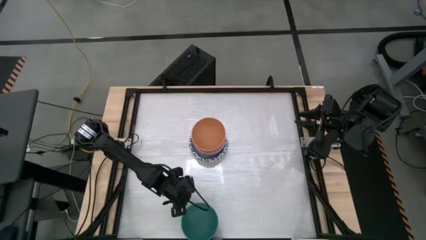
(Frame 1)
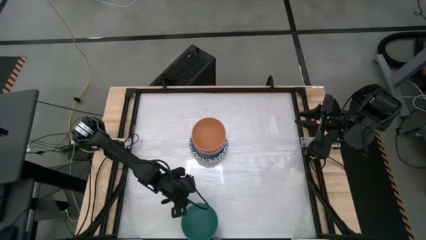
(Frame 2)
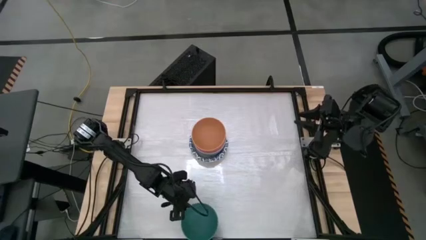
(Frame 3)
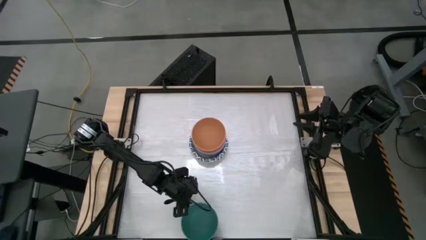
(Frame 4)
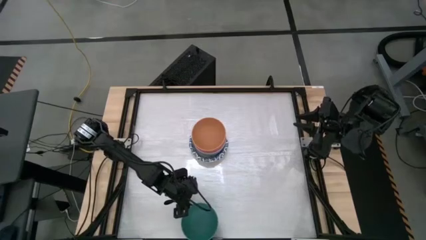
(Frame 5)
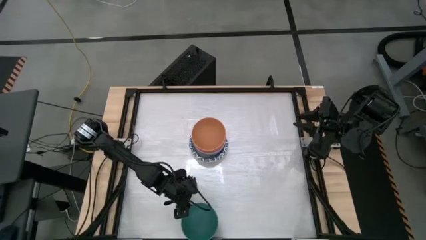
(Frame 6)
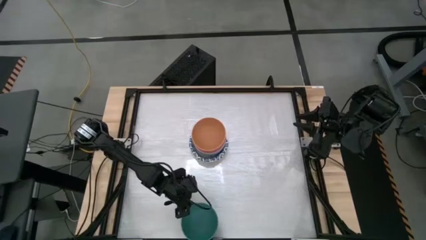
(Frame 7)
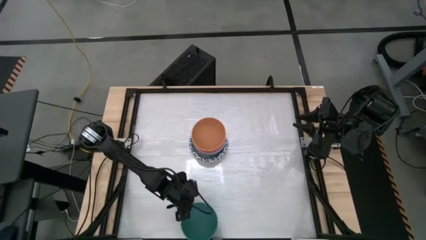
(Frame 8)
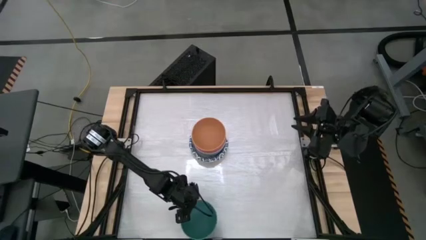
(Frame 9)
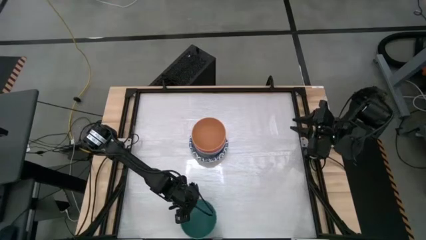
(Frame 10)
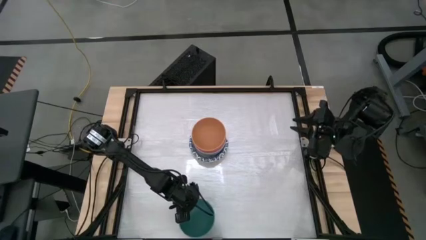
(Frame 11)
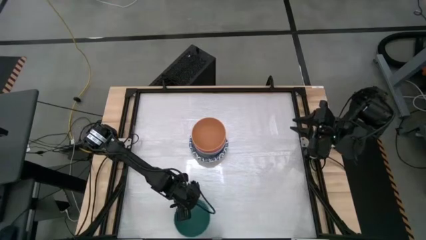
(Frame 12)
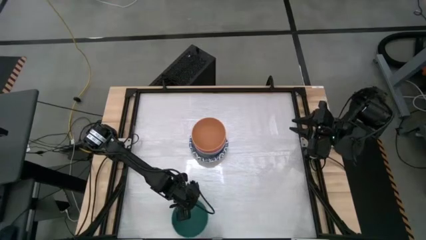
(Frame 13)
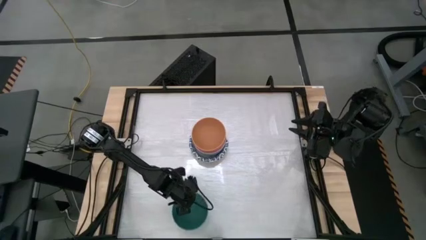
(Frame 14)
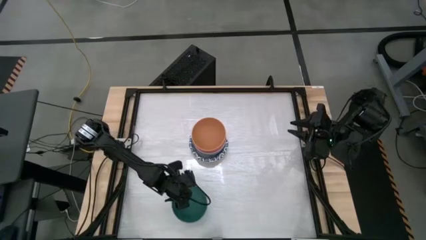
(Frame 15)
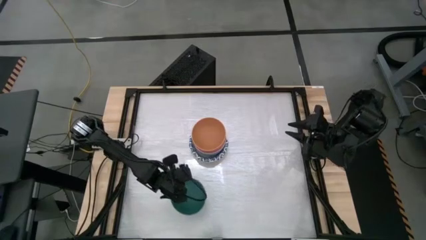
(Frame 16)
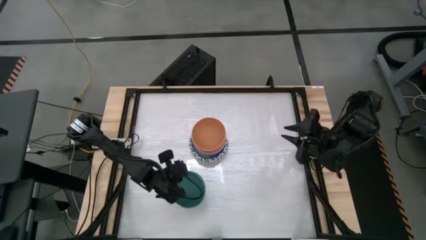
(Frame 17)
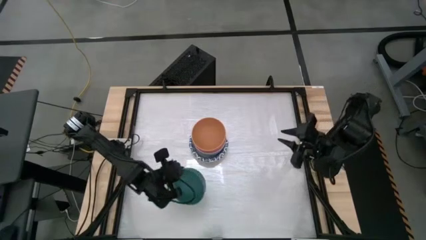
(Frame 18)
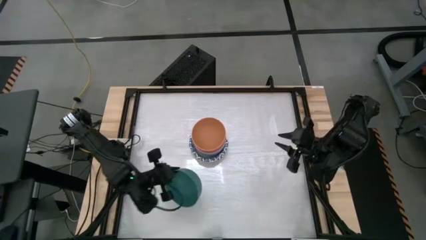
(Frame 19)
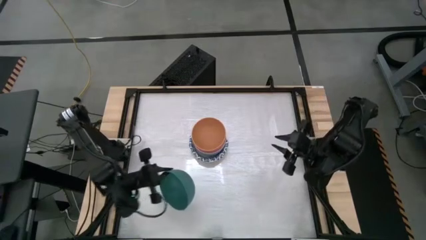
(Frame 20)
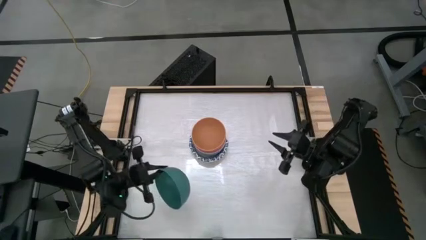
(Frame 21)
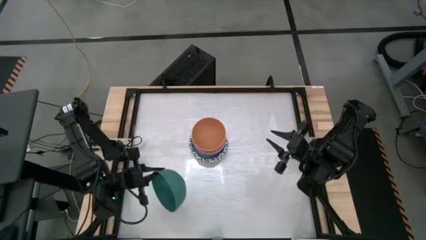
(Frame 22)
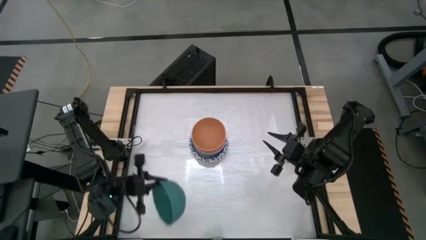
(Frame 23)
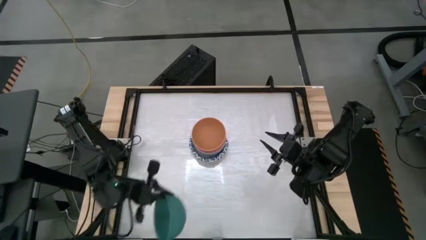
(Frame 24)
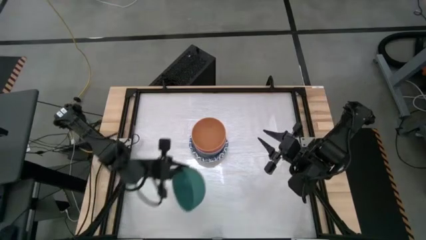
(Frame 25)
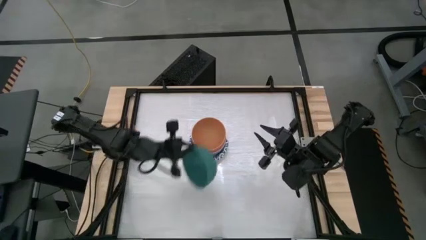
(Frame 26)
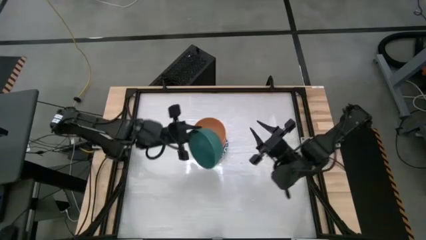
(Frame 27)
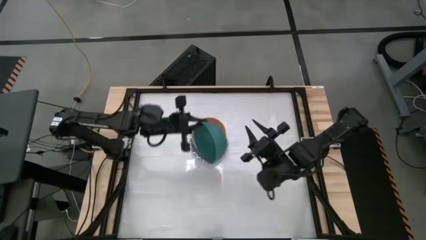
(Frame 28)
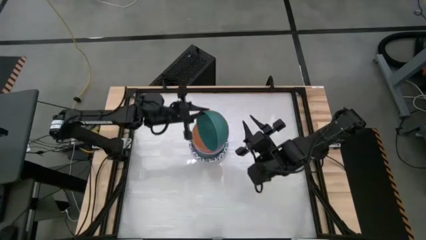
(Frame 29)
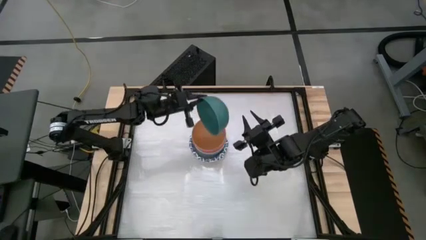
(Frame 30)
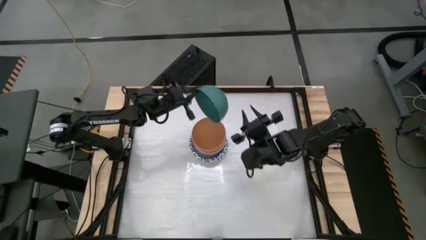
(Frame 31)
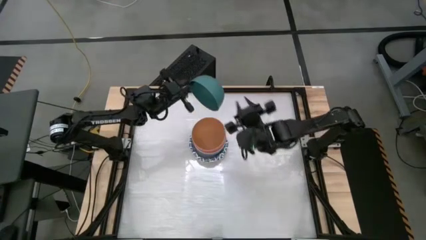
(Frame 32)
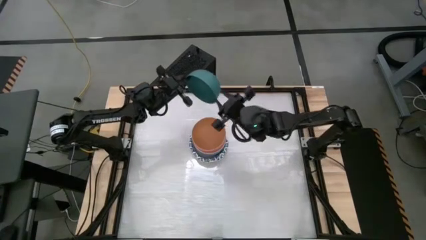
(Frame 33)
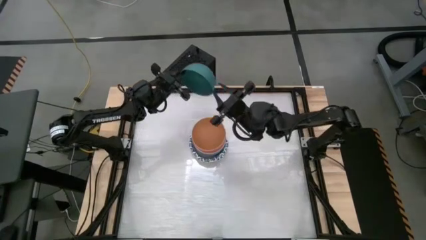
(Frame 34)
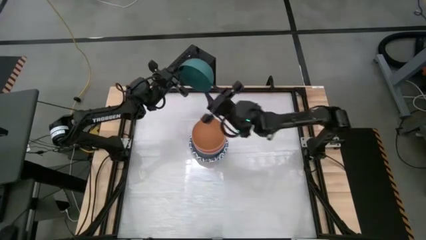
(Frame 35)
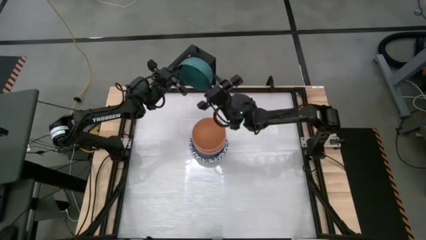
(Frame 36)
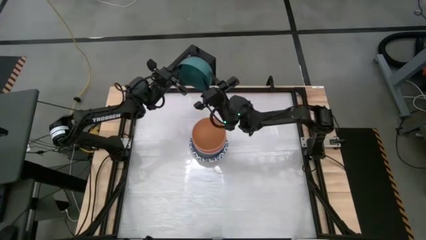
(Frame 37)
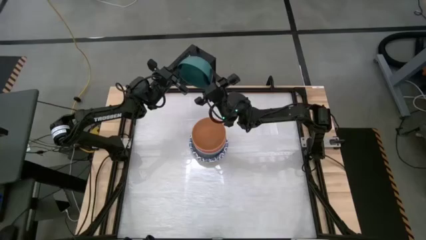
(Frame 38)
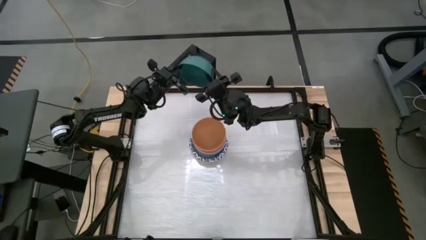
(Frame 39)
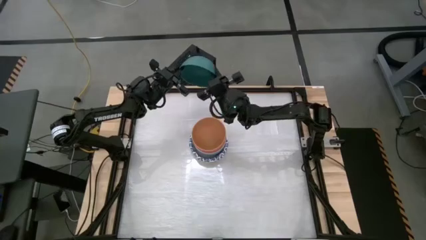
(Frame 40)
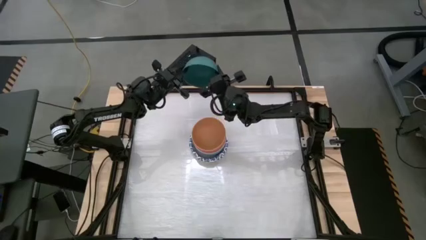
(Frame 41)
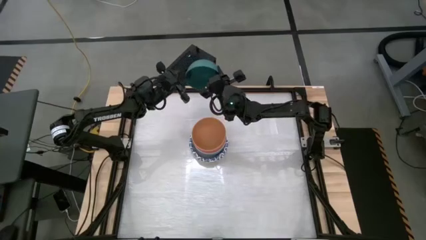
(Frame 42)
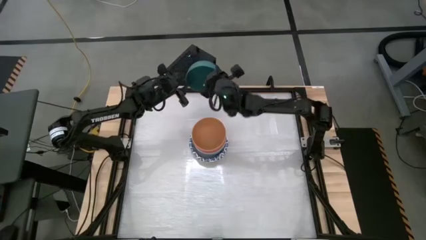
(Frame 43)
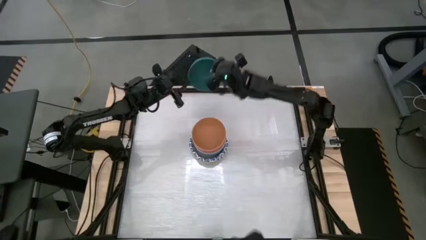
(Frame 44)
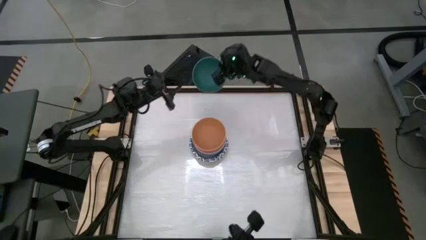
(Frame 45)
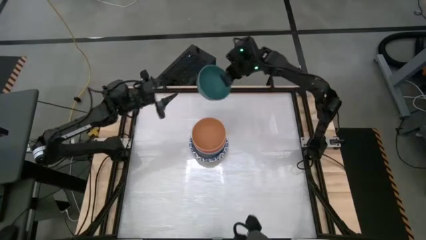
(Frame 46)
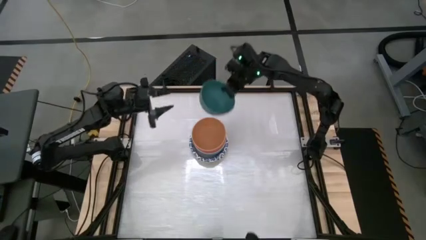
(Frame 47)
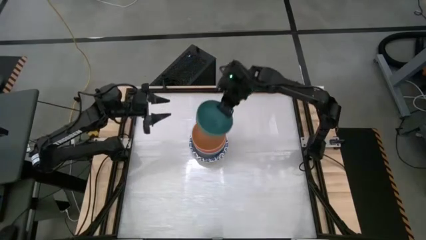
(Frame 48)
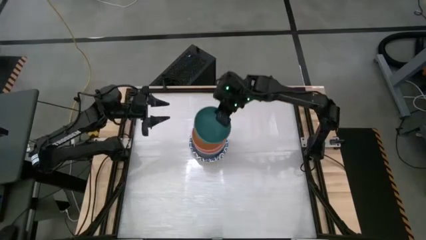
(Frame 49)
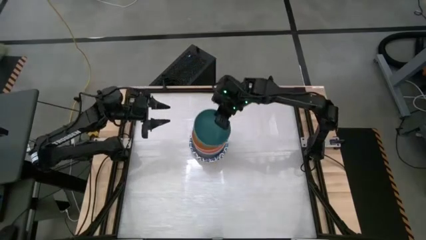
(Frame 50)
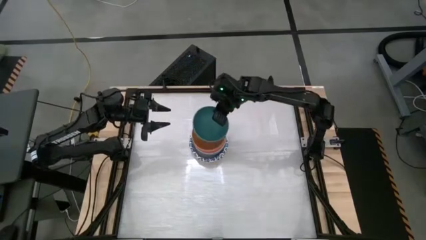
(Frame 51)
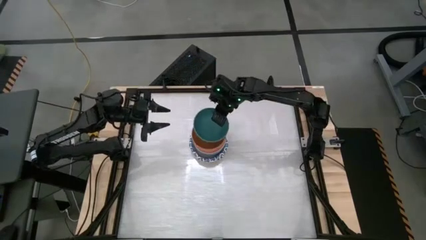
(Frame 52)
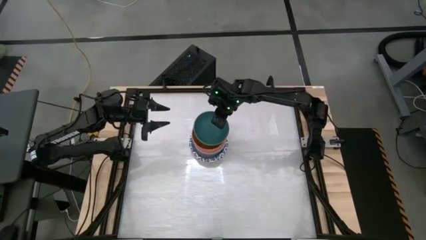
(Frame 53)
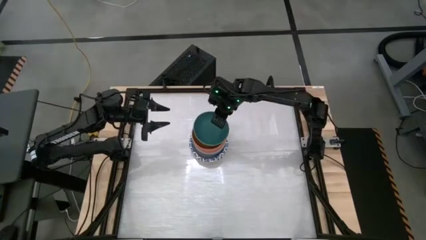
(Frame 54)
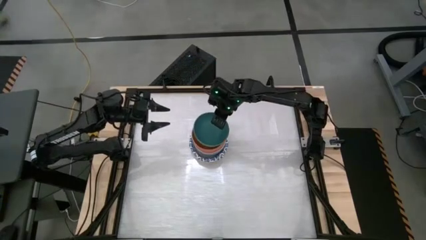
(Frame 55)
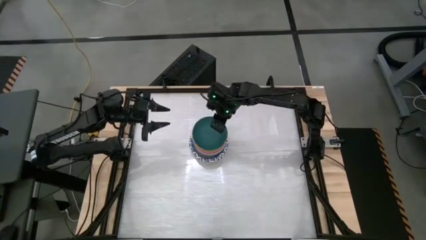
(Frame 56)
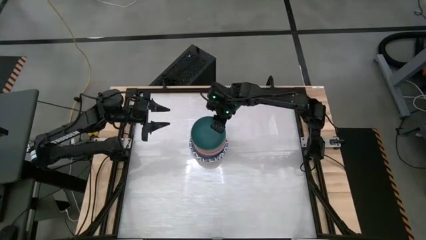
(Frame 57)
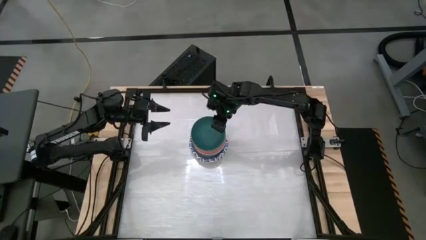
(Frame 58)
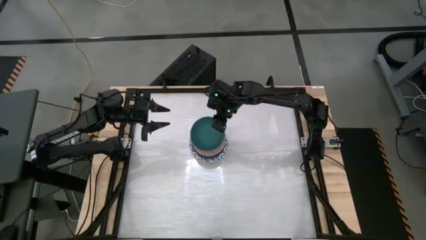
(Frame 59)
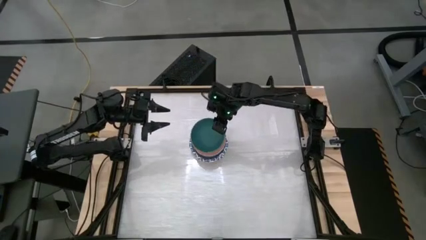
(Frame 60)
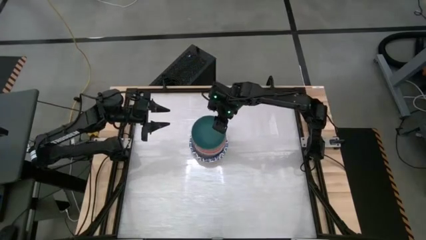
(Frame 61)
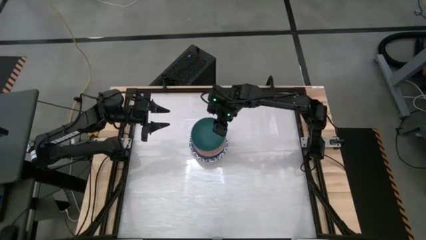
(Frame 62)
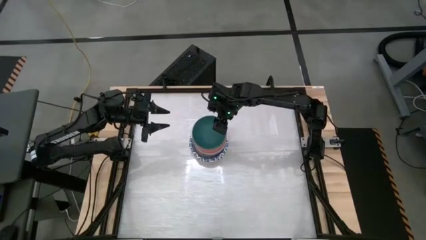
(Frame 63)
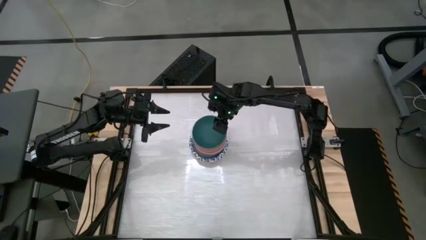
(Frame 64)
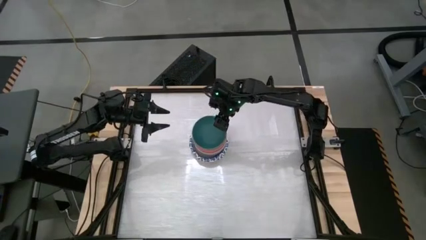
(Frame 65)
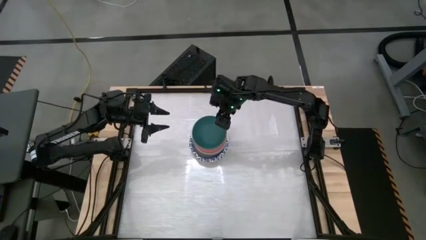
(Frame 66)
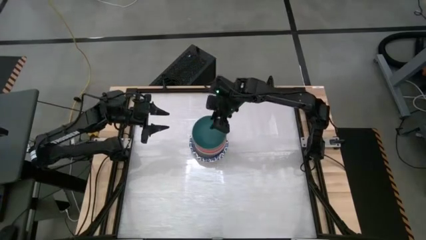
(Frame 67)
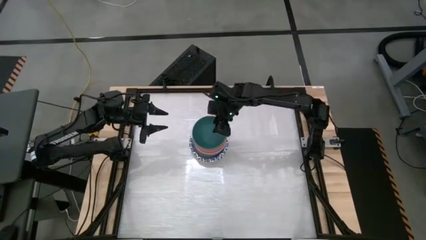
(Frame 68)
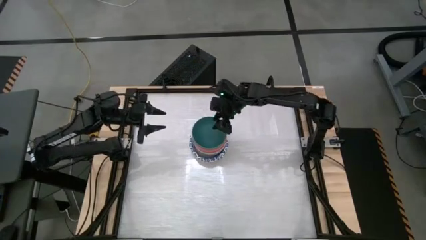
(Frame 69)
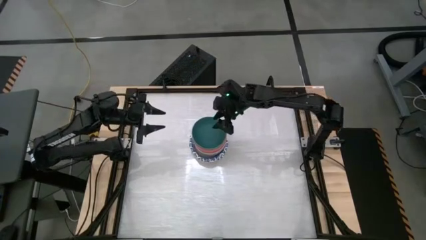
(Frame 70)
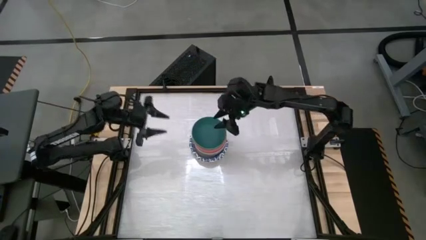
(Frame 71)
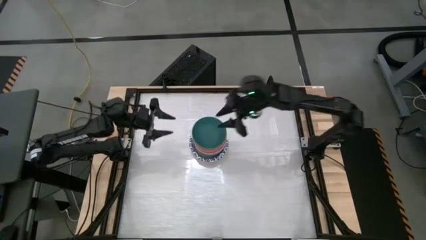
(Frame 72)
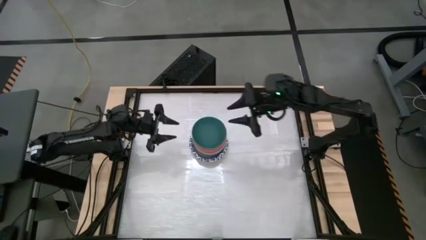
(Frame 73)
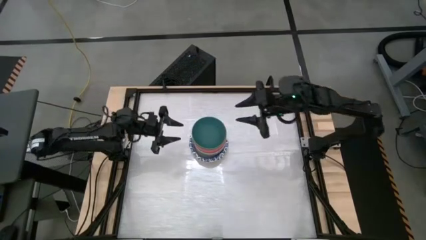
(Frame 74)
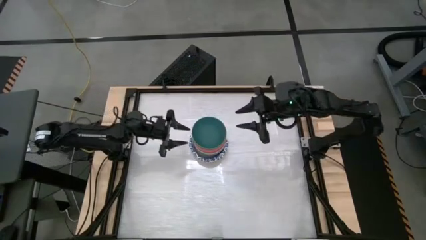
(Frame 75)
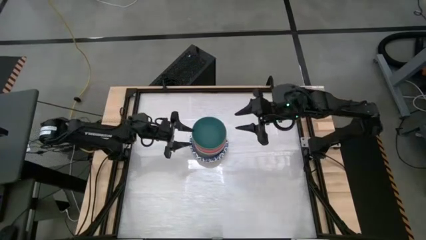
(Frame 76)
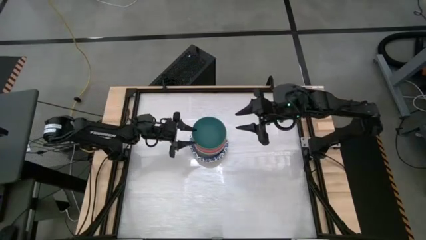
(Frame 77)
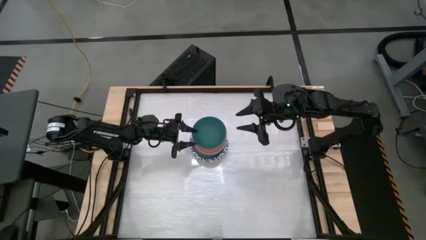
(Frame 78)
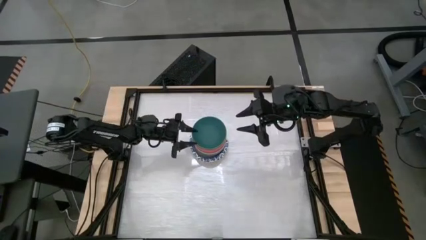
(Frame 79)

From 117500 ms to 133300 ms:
Stack the green bowl on top of the orange bowl
